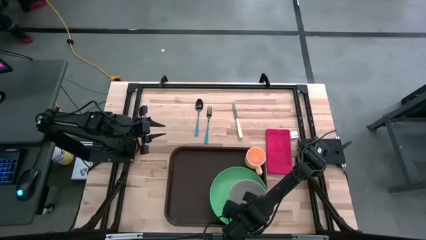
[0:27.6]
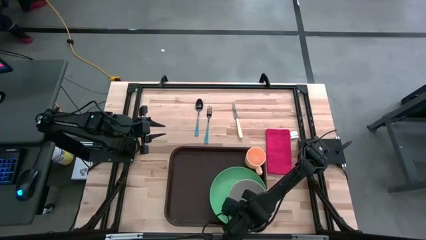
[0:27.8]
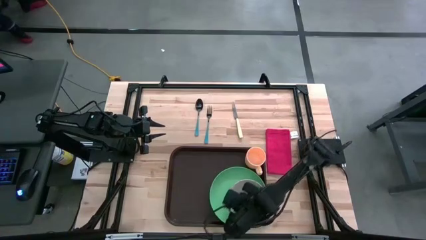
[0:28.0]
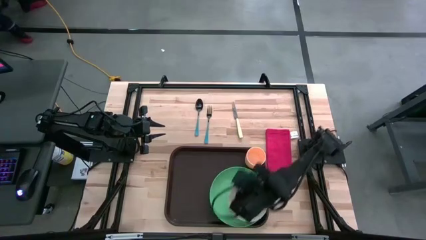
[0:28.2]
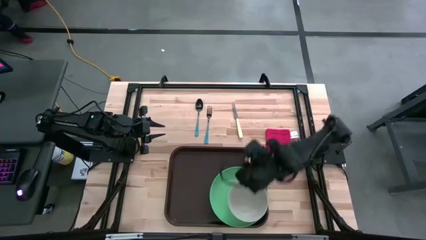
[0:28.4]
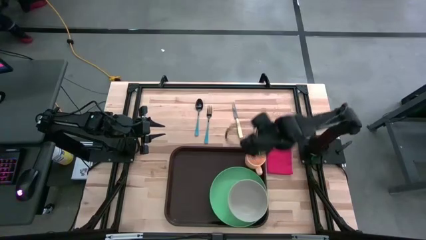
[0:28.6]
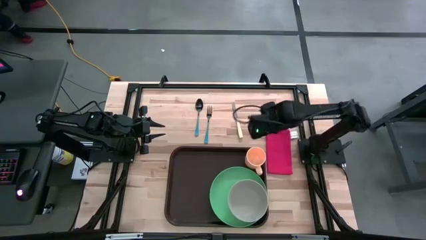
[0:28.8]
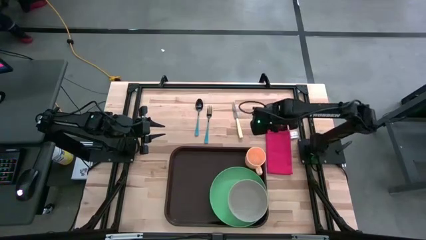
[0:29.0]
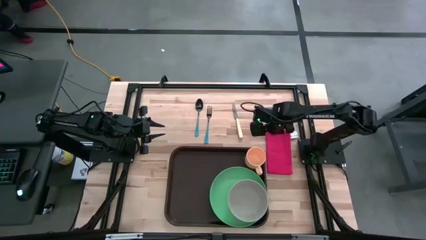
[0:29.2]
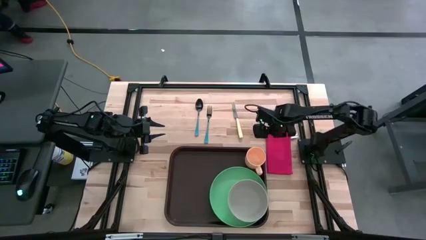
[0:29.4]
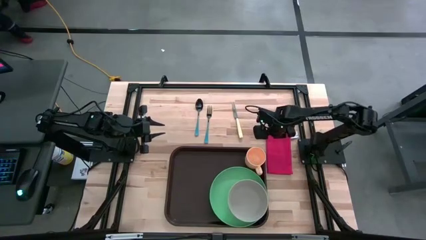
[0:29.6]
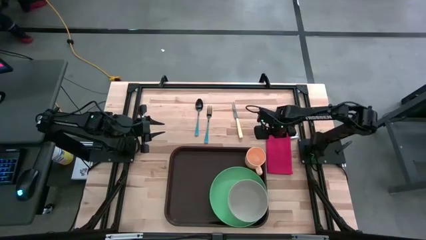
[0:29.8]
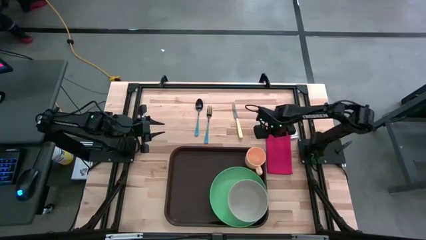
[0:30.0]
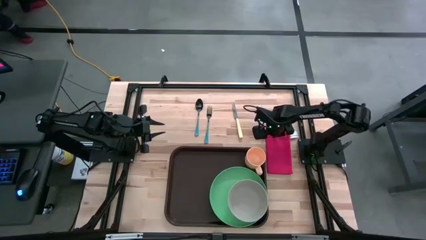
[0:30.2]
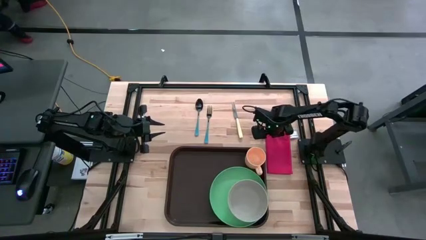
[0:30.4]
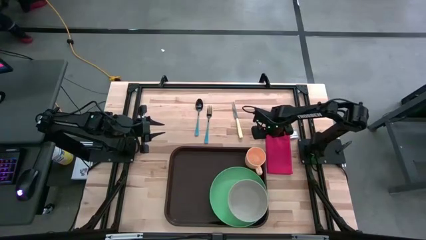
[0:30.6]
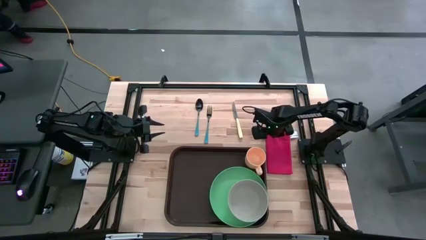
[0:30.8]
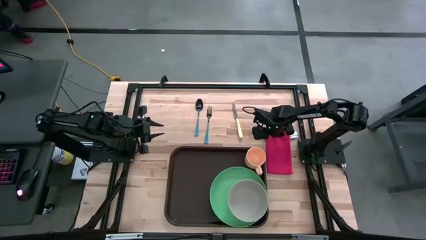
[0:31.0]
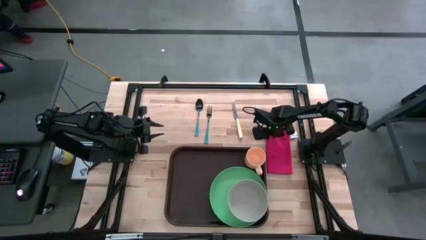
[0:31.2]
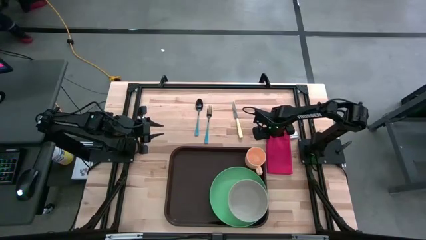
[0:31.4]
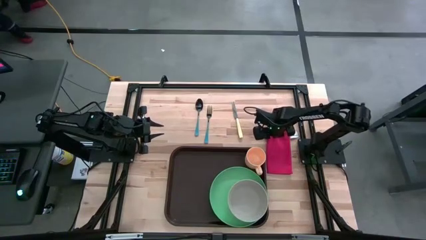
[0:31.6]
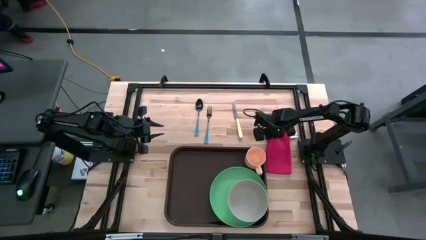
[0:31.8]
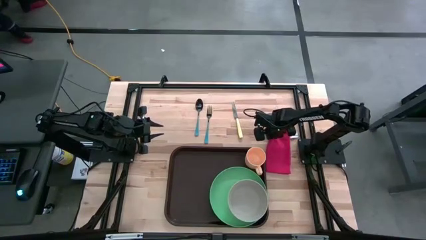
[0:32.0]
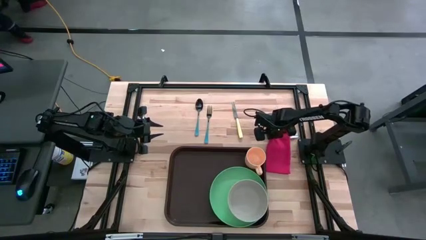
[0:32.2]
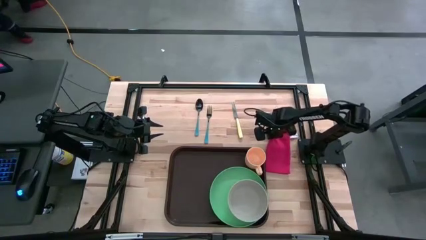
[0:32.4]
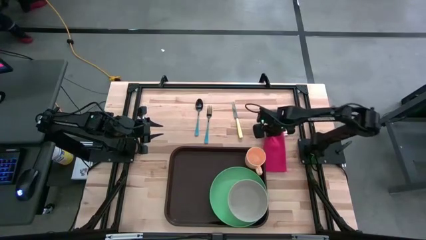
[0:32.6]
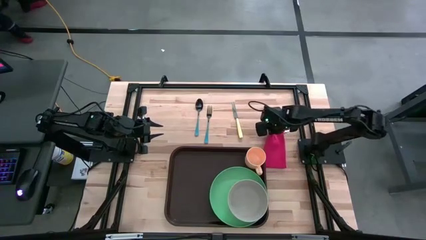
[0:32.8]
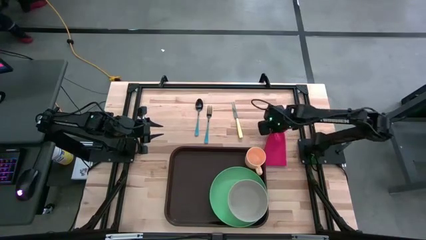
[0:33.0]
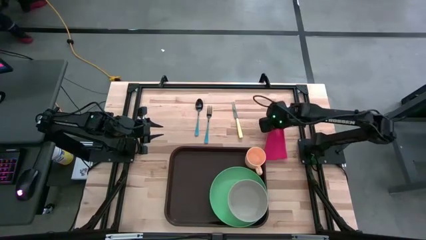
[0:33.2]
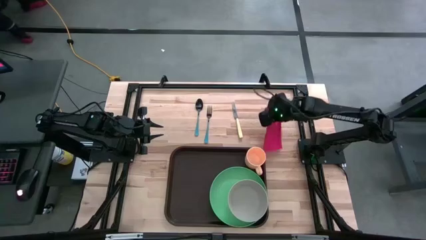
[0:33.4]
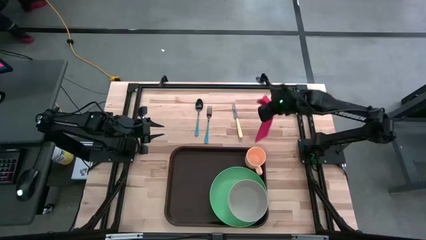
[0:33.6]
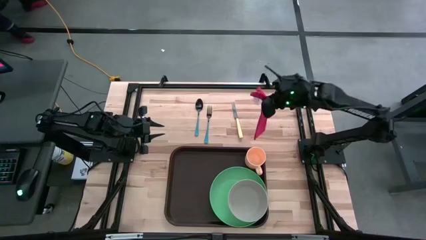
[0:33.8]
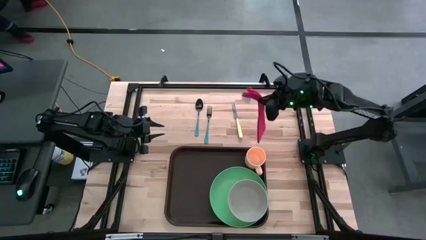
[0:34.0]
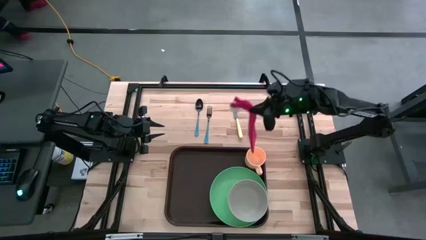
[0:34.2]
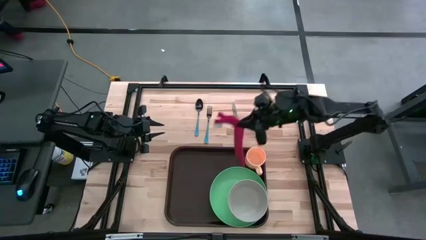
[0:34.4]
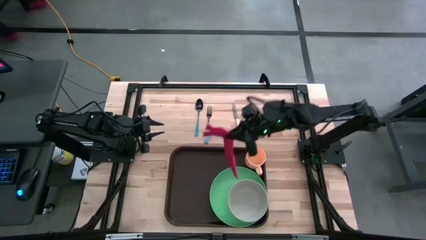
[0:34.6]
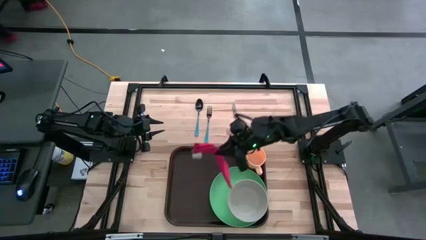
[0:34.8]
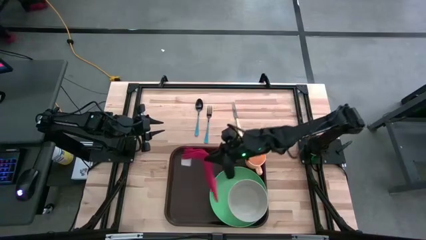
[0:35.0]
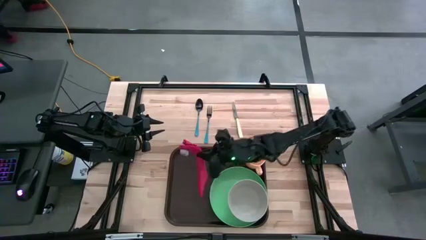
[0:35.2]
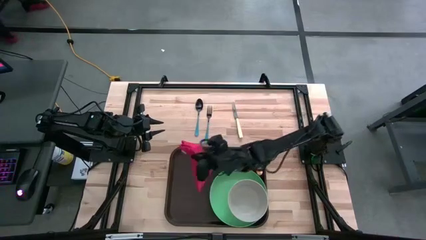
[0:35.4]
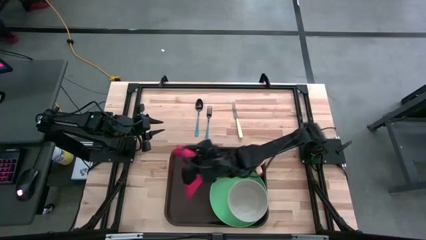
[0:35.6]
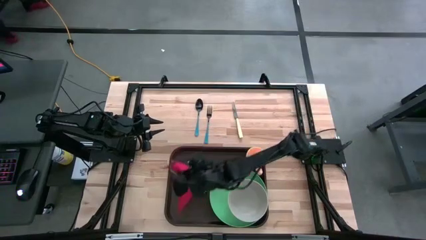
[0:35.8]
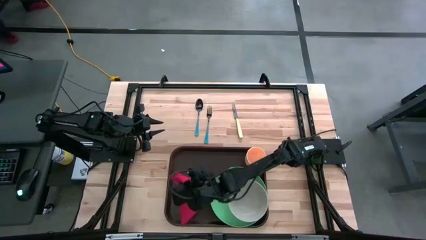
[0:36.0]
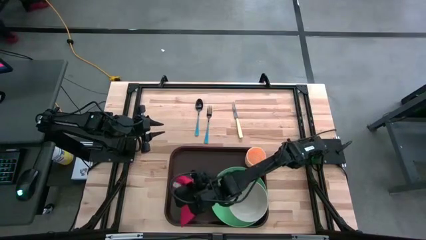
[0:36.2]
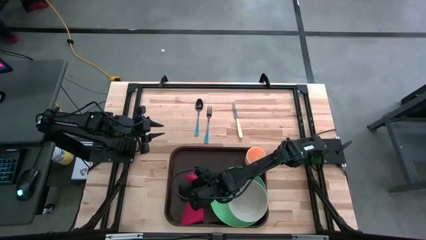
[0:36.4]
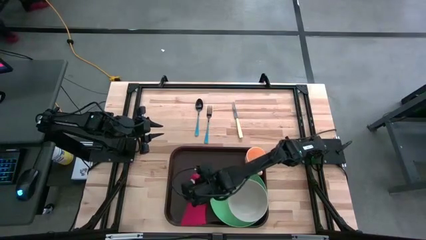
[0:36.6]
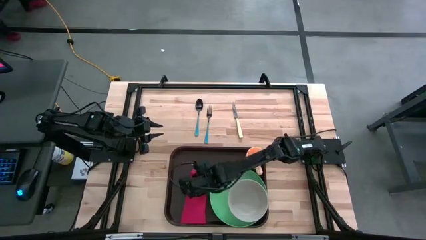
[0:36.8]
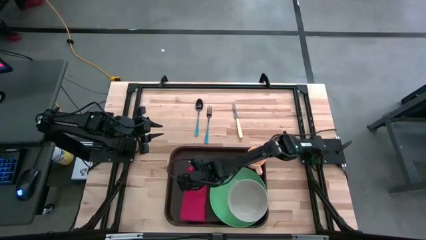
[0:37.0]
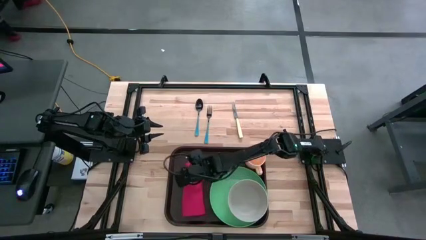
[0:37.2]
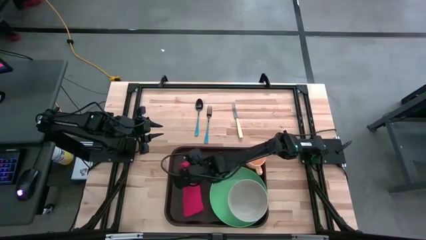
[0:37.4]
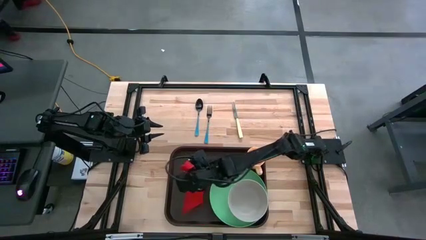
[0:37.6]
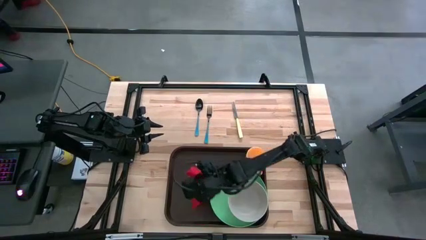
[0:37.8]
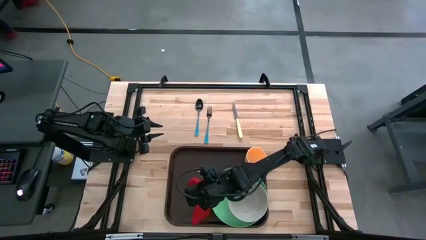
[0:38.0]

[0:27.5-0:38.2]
Task: Set up tray
Put the red napkin on the brown tray to the left of the green plate

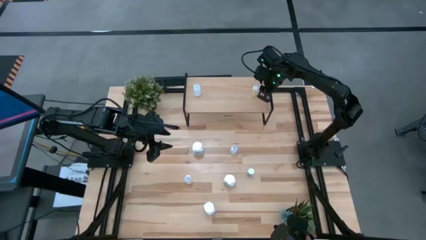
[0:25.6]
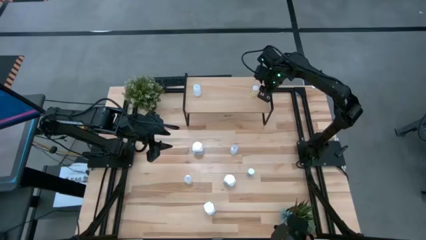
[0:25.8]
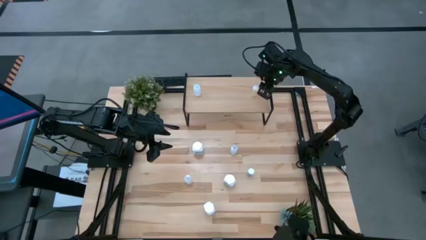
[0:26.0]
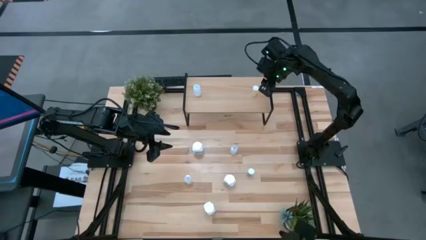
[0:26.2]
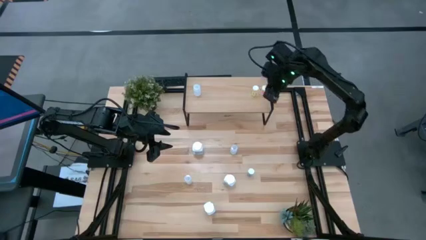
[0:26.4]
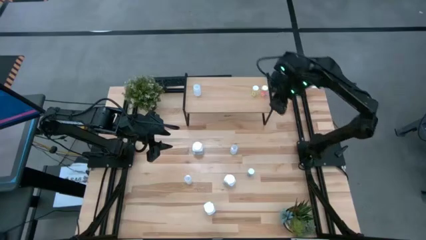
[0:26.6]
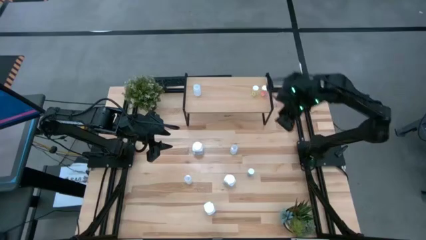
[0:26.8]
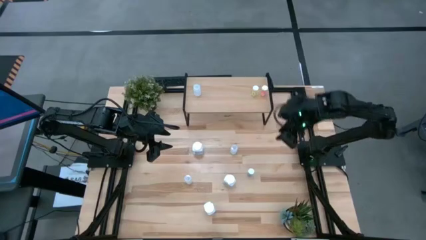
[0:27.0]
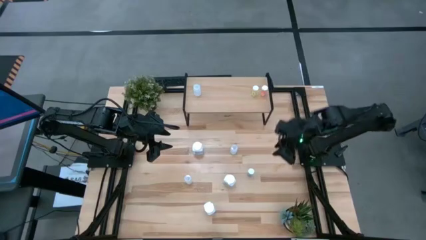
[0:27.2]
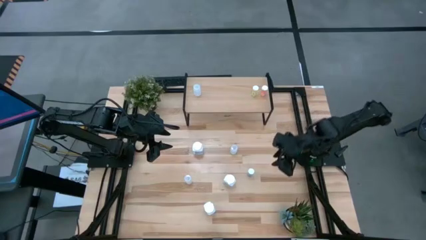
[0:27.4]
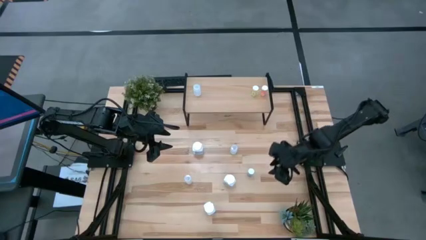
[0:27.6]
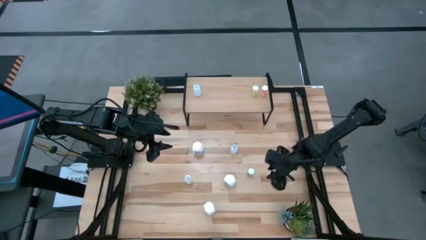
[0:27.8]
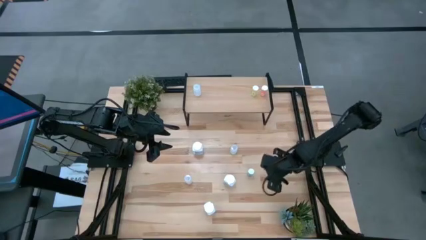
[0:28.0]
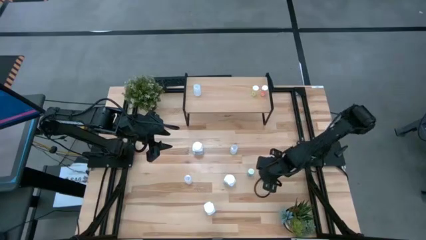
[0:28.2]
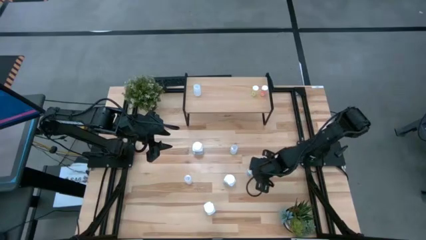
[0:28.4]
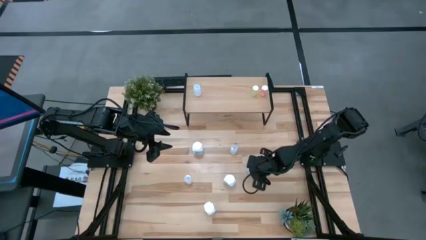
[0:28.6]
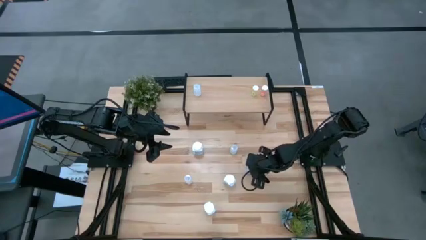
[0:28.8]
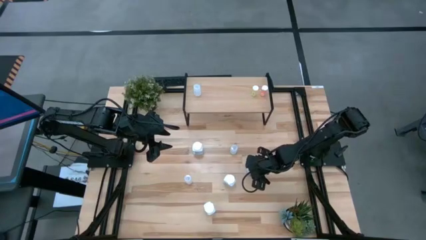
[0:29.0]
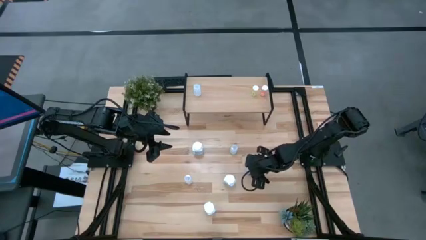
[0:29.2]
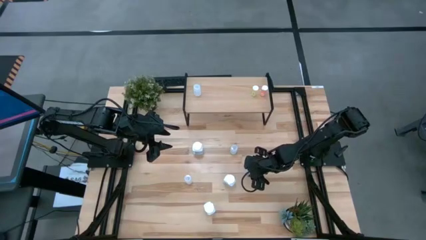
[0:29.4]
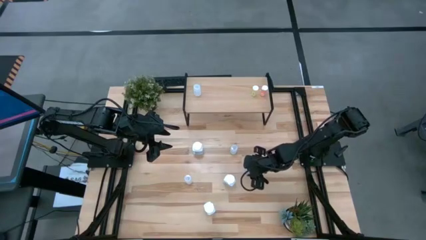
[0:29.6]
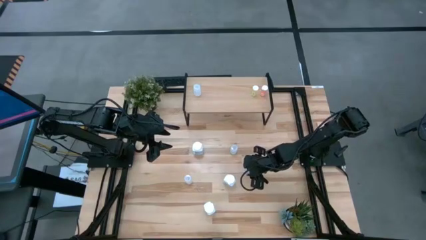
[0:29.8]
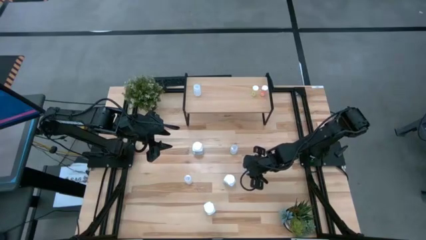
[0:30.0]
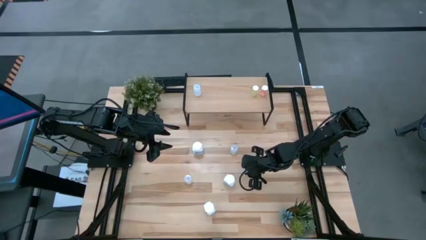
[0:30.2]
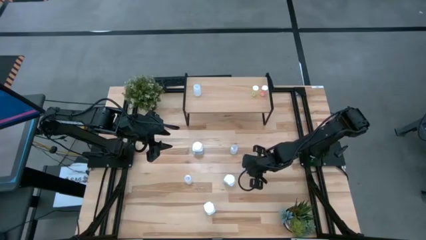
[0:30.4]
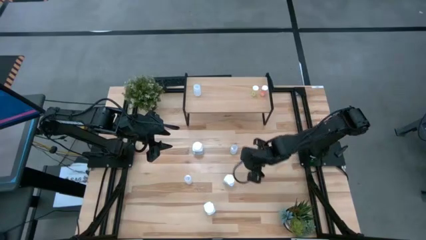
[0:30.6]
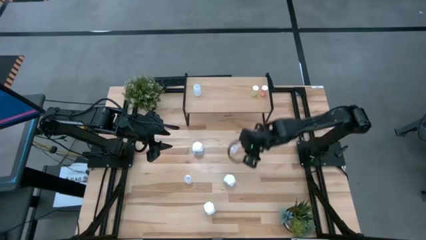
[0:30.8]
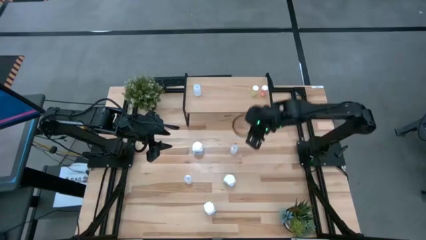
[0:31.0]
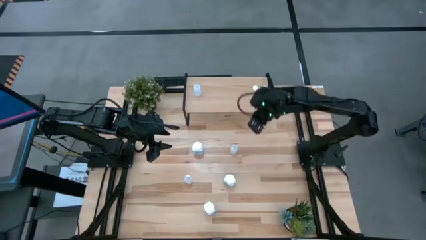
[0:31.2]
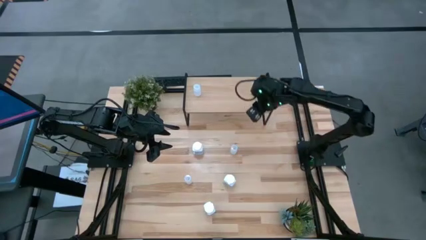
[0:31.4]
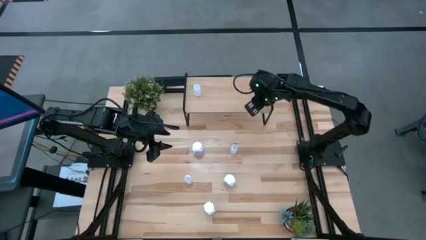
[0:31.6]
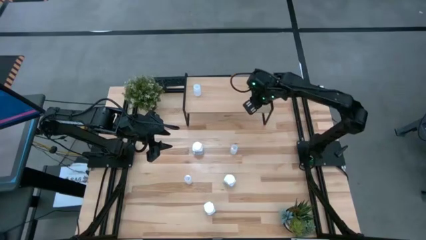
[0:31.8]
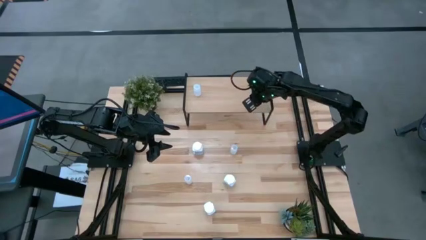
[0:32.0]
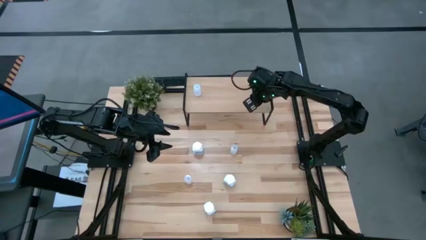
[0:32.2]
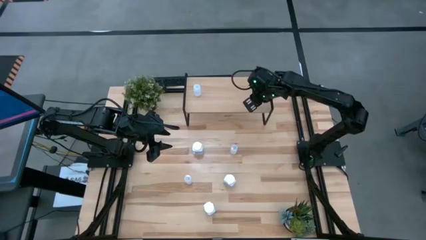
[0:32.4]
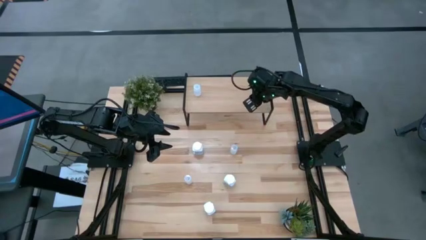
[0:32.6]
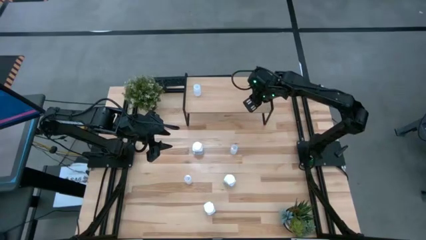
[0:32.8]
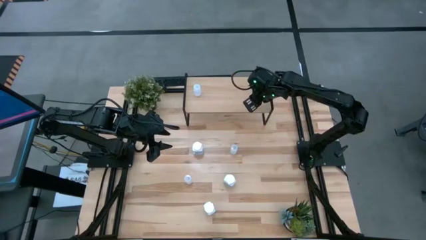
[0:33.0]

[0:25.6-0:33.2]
Task: Pick and place medicine bottles onto shelf by color
Put the blue transparent pill bottle on the shelf
